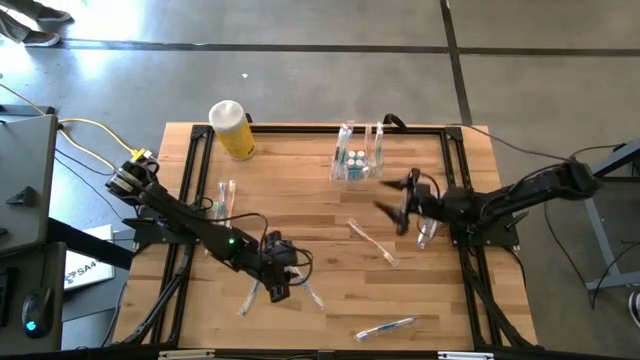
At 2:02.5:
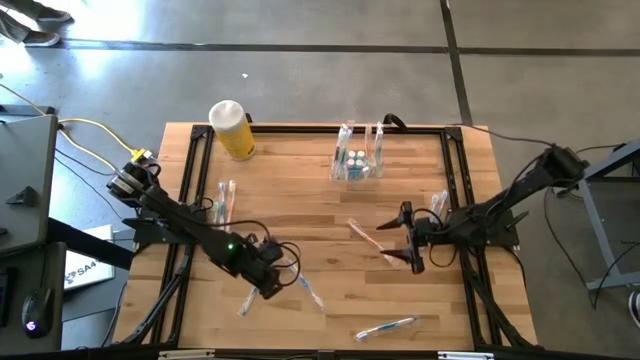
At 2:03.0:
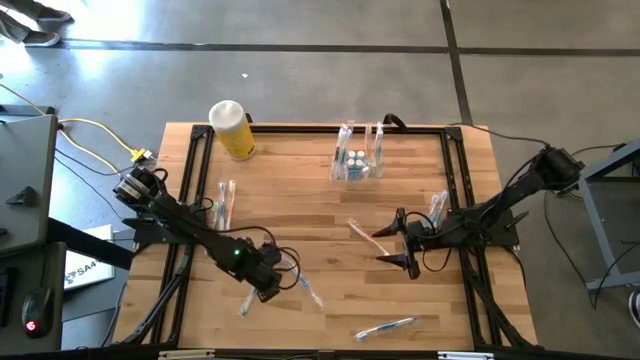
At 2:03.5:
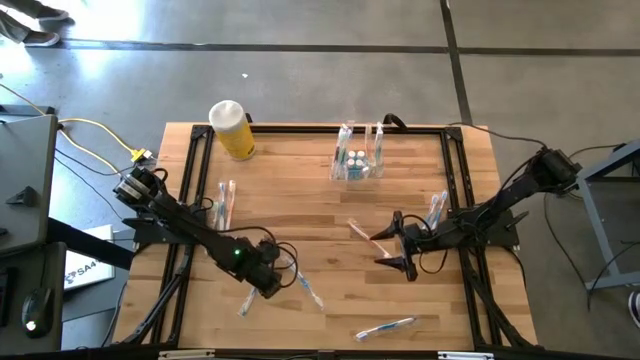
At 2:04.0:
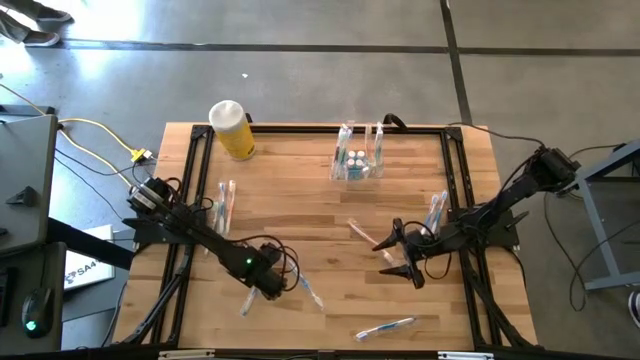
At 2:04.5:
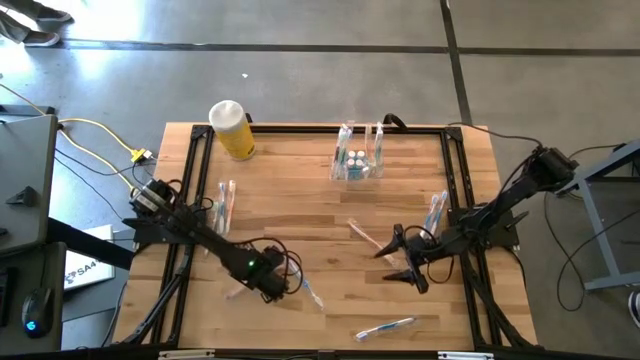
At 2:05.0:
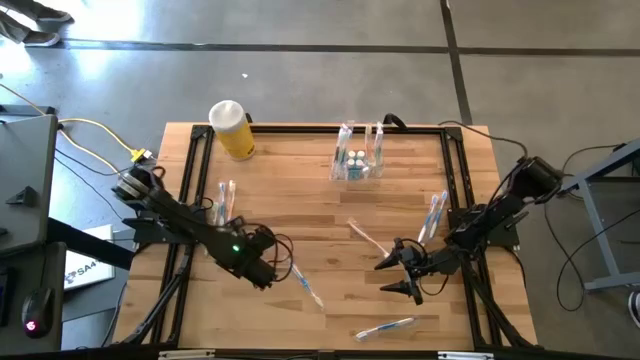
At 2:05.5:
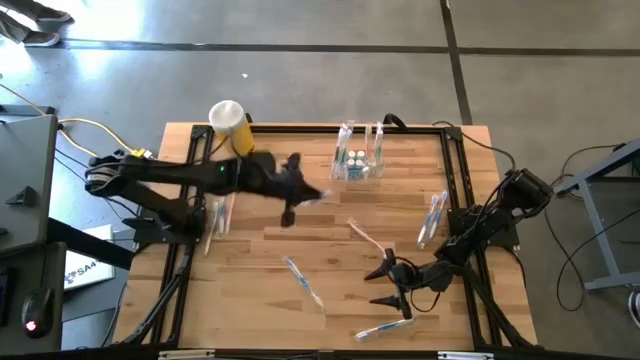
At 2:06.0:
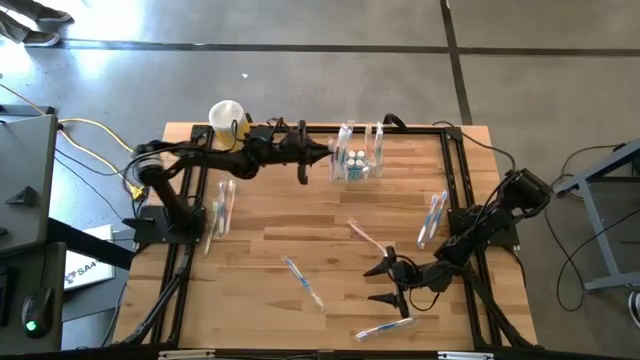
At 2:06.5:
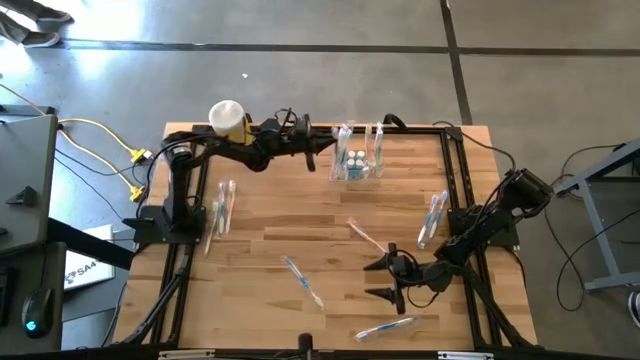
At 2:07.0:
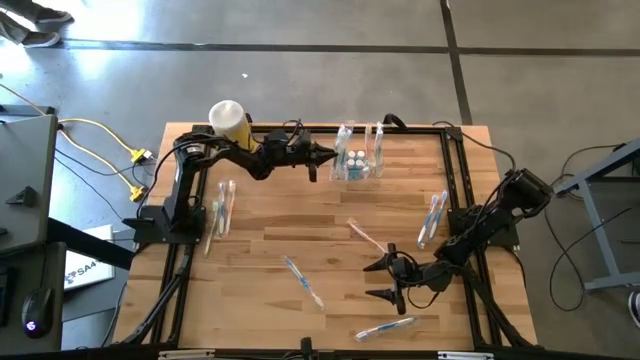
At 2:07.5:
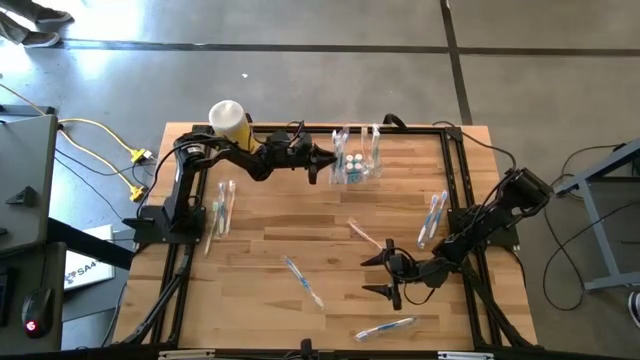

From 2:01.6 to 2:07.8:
Task: Pick & Place toothbrushing station
Put the blue toothbrush into the transparent organizer

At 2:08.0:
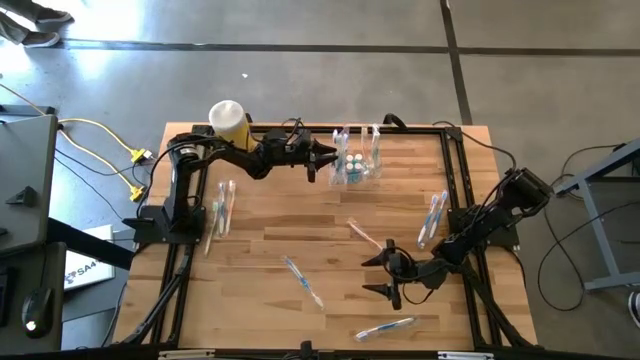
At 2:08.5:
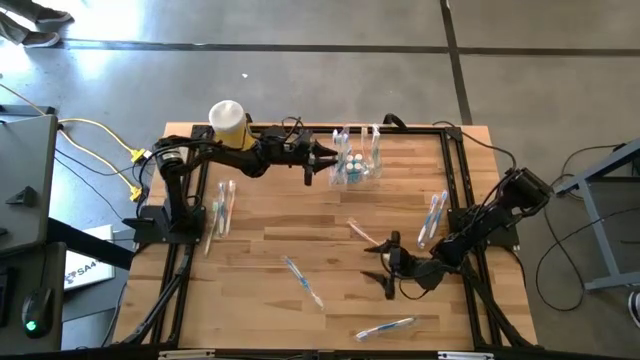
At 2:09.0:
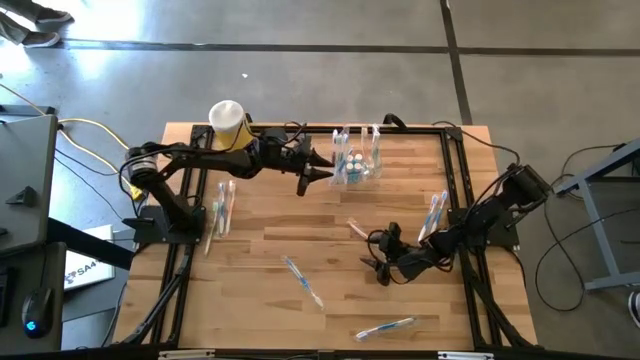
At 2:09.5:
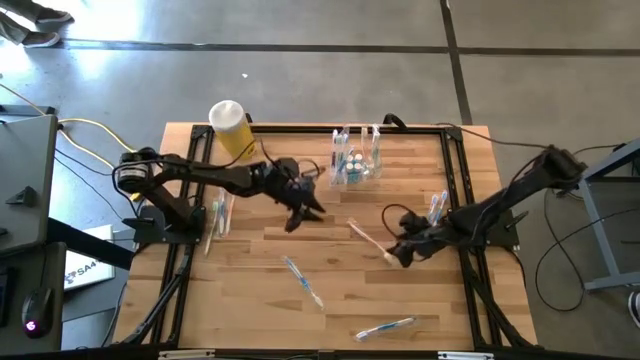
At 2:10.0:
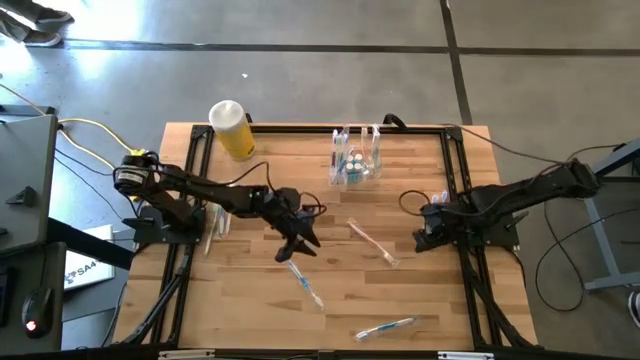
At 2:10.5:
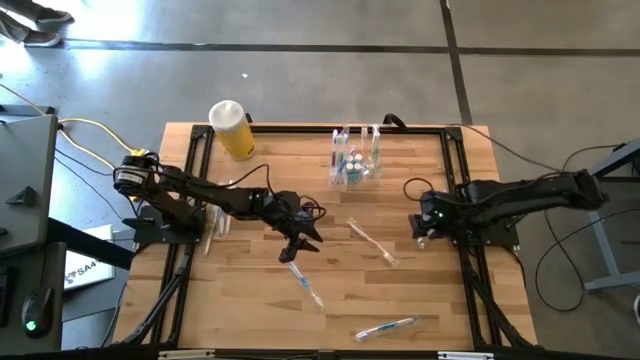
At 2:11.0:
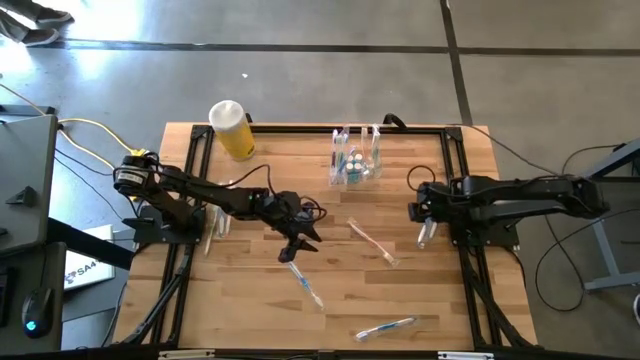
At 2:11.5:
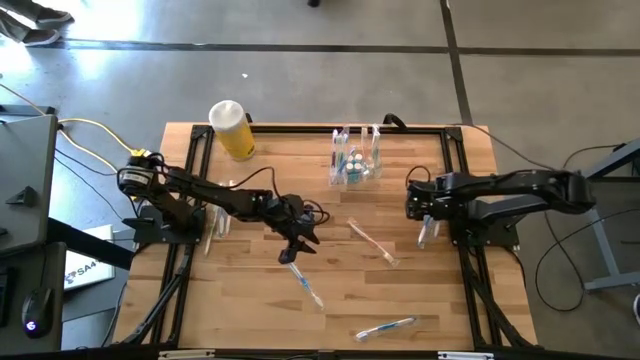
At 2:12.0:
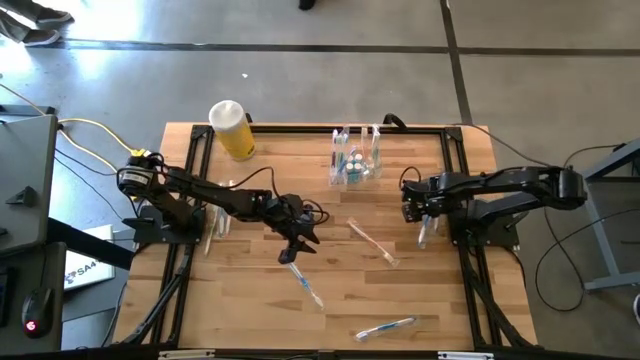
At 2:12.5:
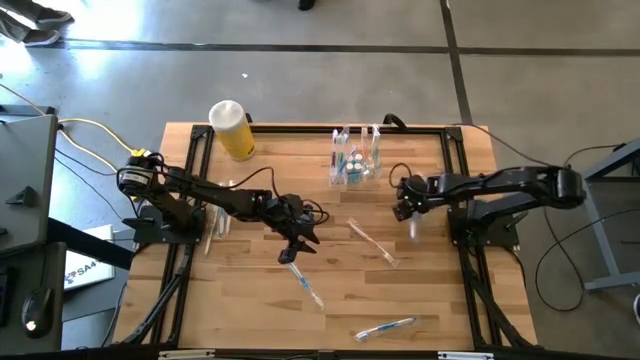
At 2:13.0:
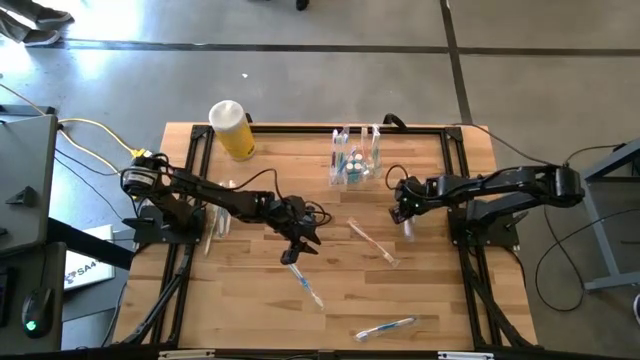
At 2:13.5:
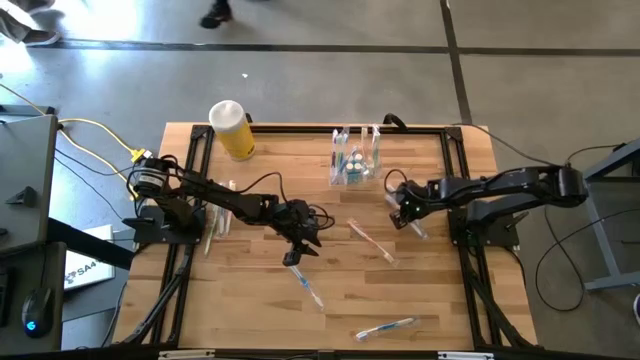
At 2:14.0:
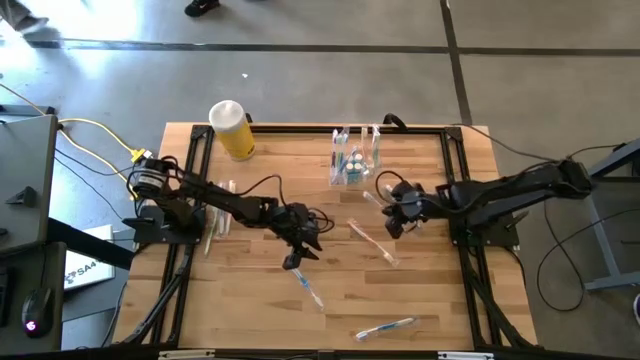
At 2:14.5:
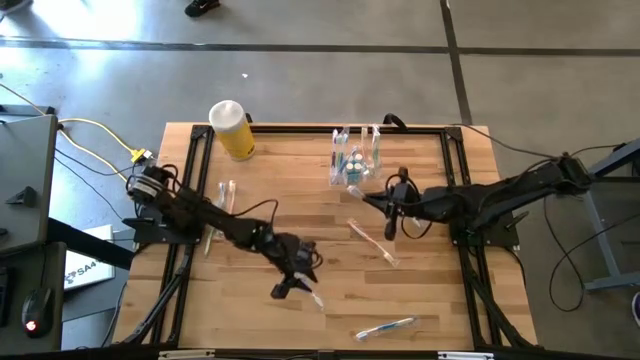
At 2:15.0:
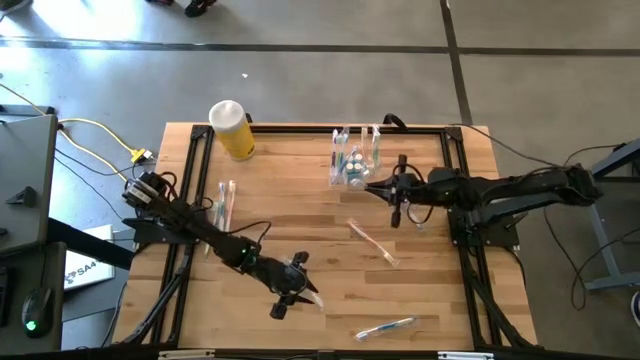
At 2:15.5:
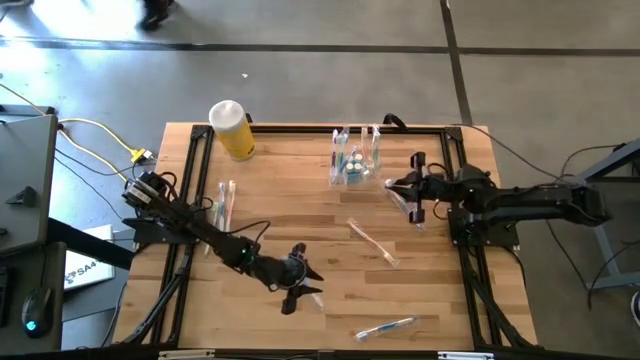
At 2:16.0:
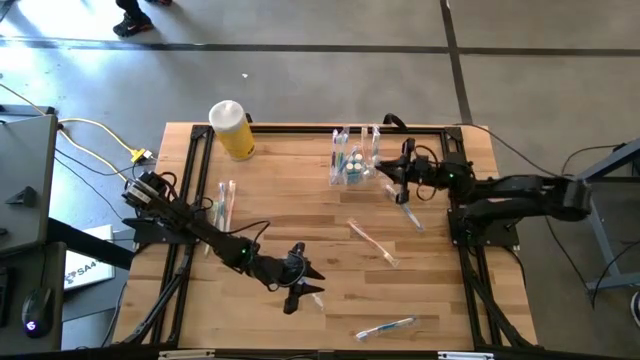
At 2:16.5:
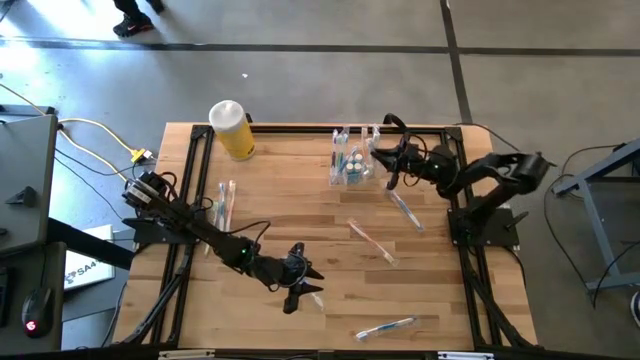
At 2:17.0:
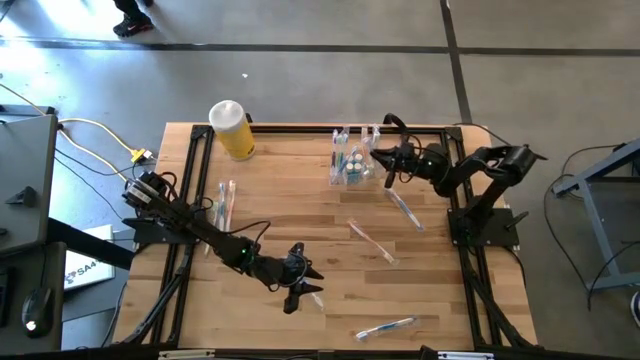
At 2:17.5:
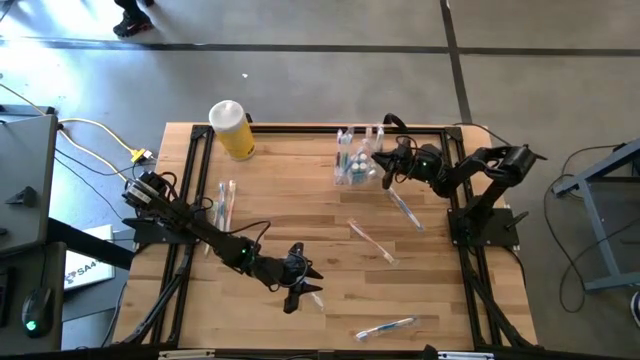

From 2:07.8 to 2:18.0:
Put the blue toothbrush into the transparent organizer

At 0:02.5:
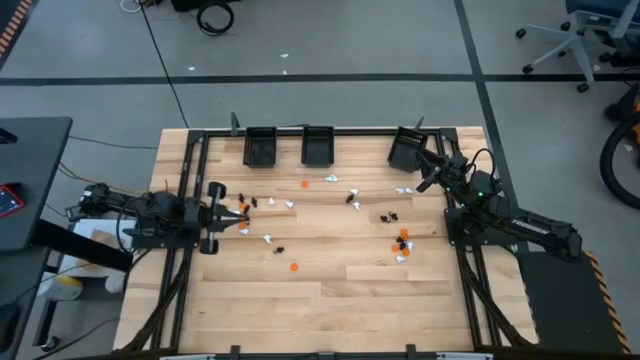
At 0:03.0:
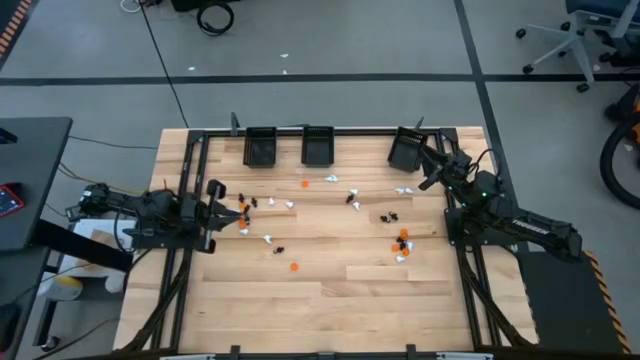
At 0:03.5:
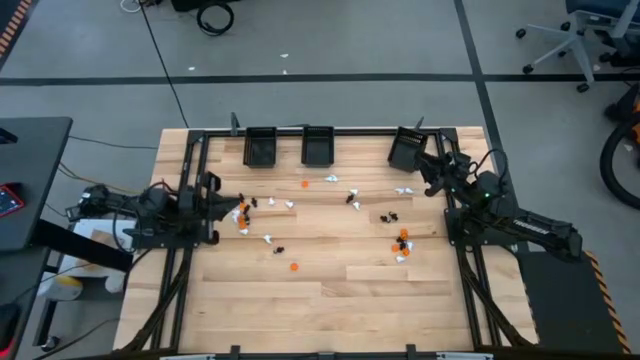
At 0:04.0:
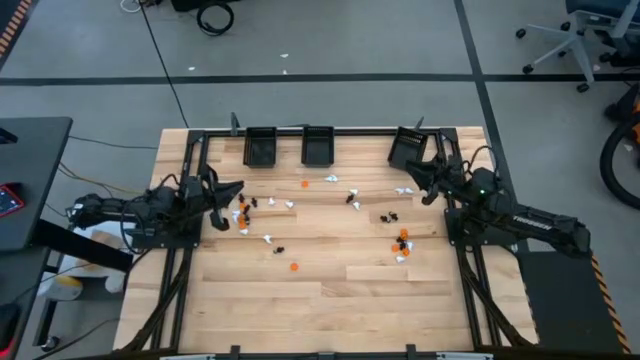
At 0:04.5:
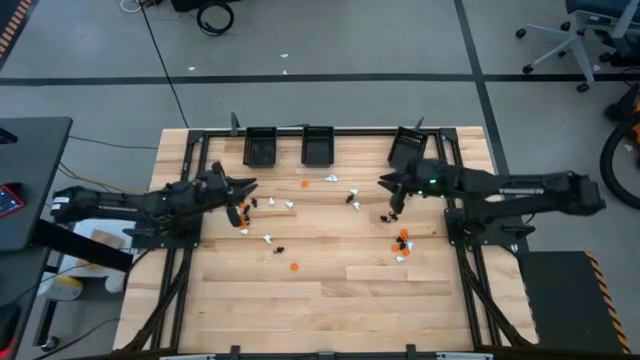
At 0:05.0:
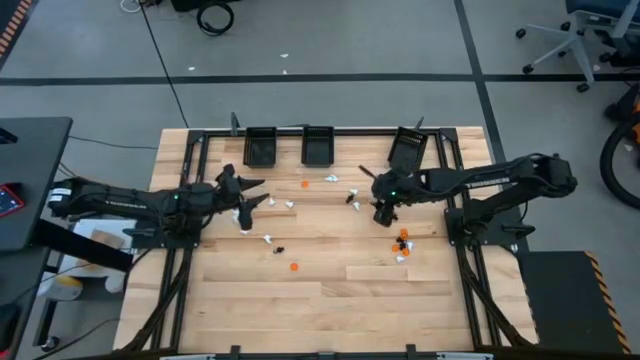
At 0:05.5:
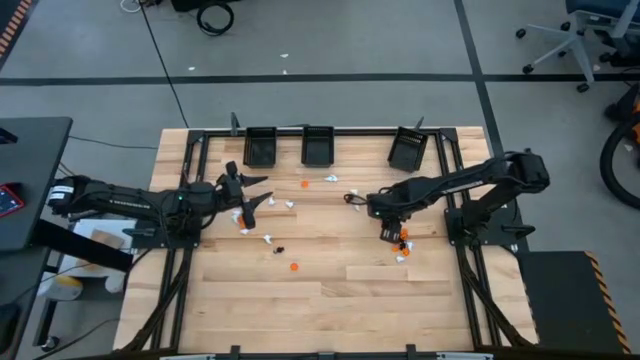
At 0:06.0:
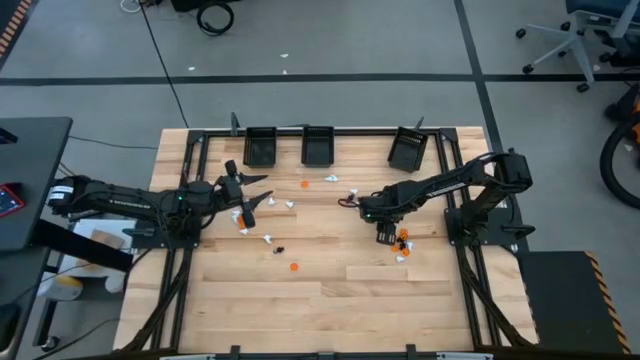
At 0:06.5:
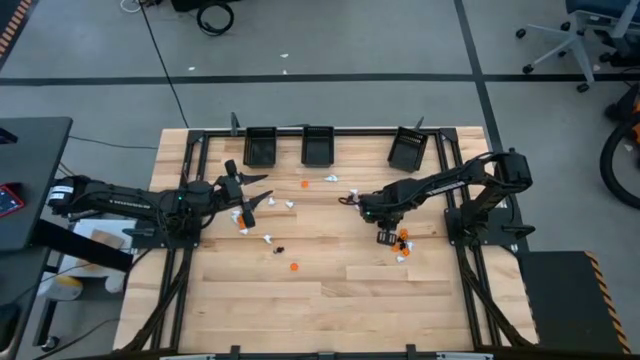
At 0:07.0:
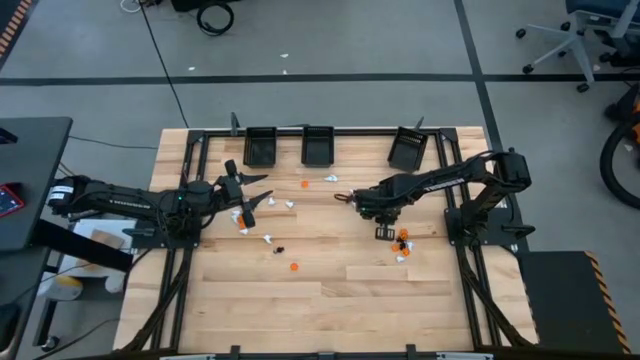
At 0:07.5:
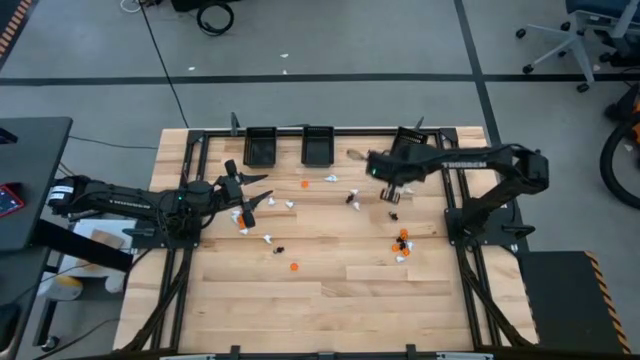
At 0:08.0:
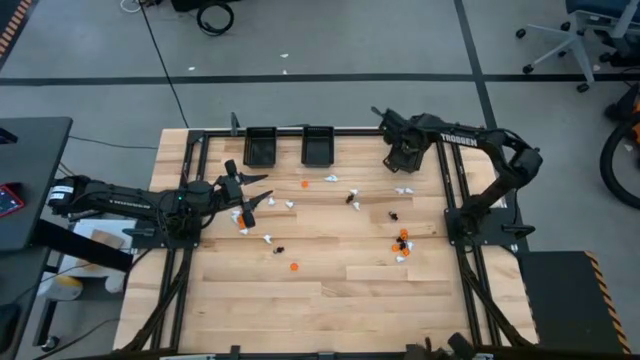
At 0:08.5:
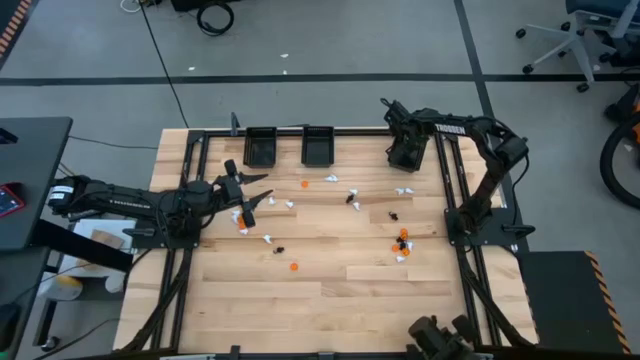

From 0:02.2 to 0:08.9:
Task: Sort Halloween decoration
Put the black voodoo toy into the right black bin
